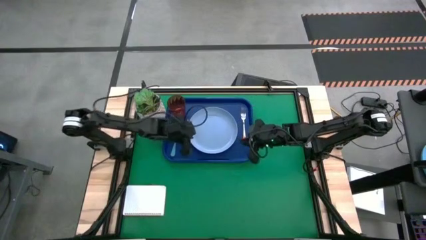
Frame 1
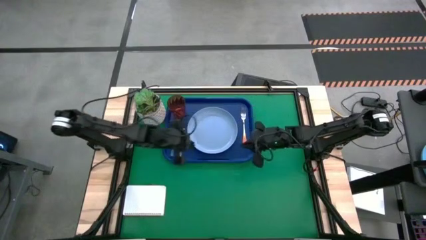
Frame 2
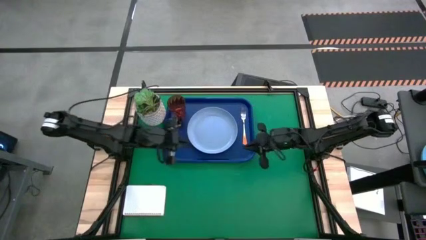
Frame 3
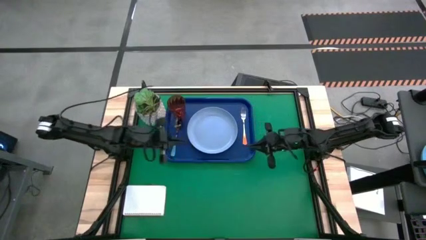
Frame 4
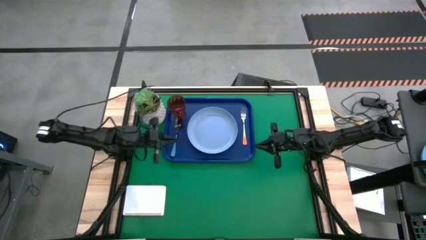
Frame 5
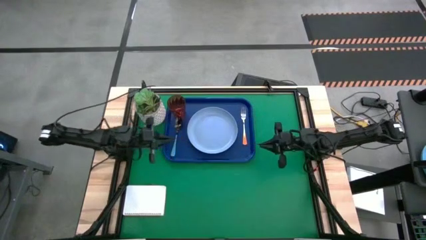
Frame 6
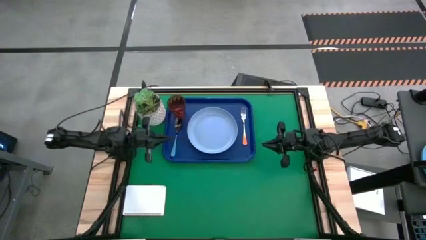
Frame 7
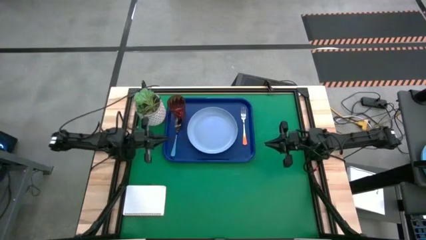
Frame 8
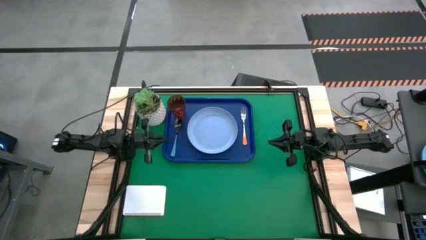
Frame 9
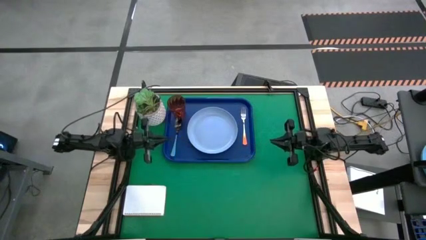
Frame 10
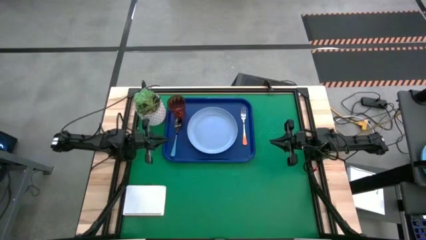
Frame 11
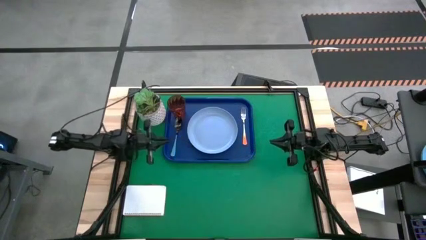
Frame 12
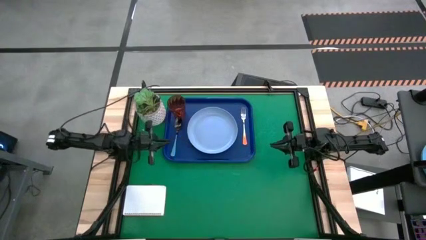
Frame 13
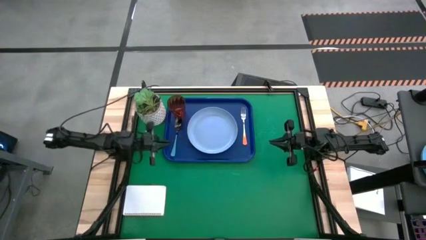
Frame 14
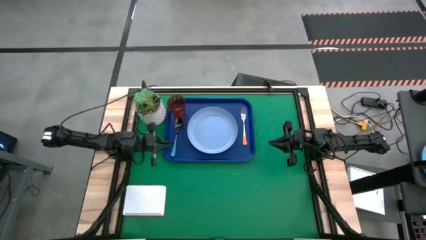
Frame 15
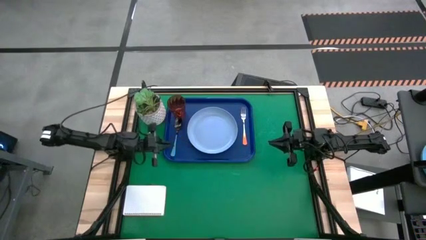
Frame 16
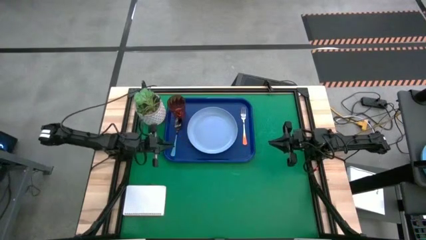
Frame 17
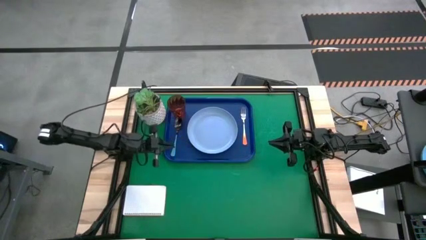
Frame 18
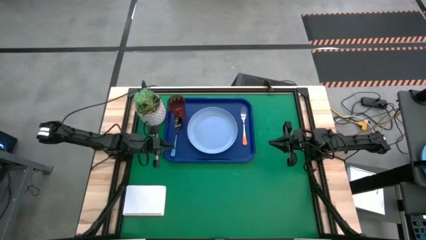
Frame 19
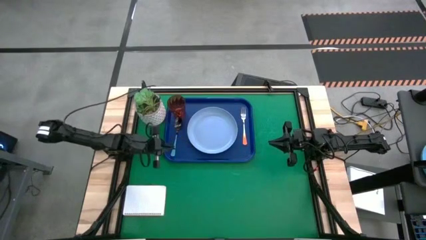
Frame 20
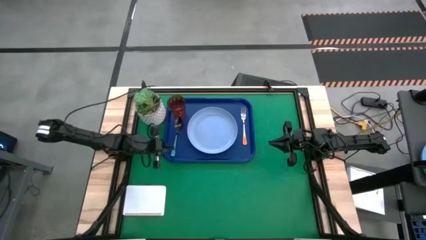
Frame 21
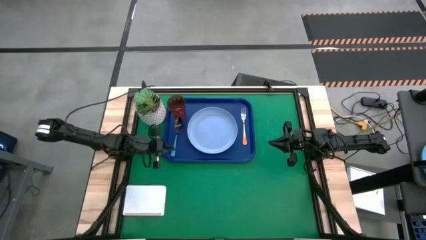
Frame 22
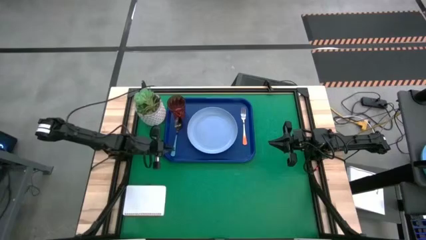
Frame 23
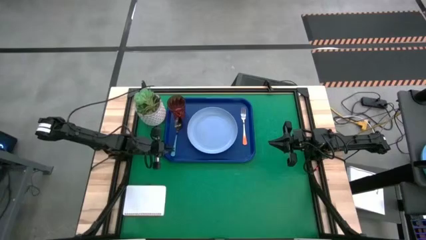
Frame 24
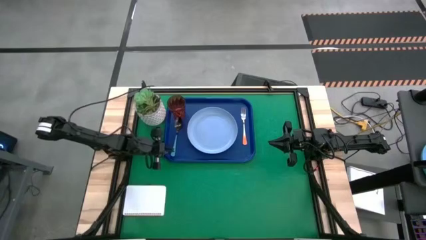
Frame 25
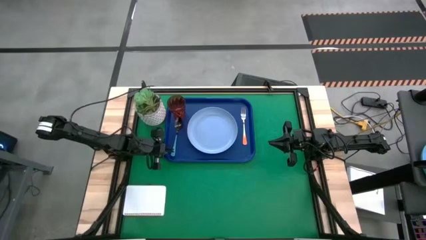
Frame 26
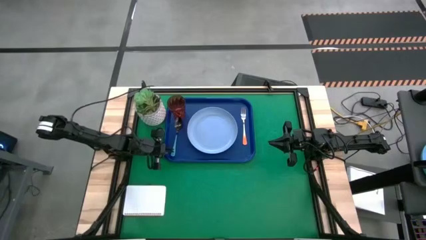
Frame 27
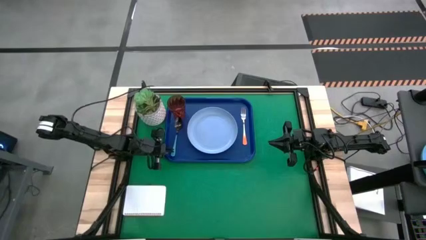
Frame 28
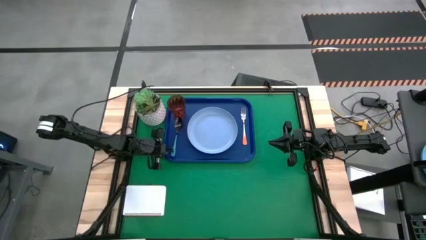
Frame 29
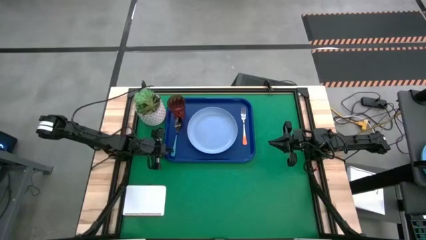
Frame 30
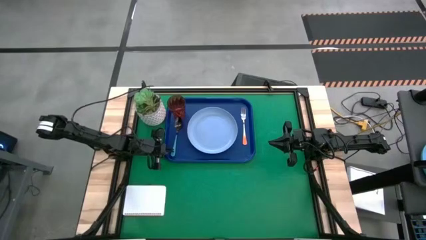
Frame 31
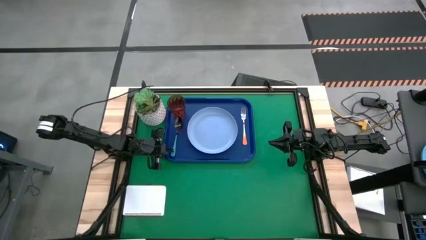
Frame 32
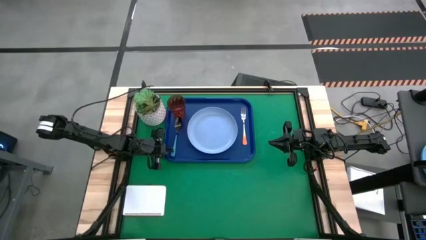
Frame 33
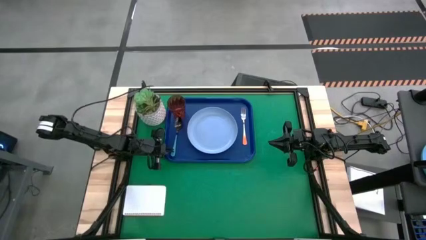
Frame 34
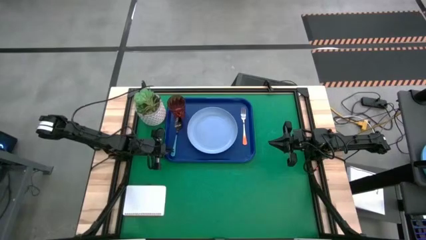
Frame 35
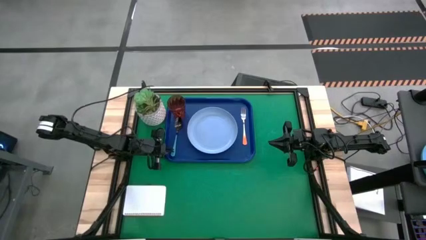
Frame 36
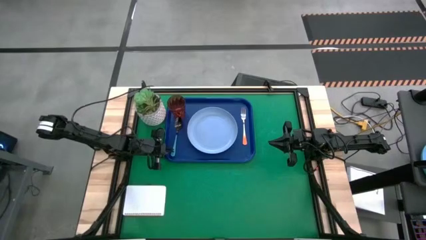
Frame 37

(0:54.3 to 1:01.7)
Task: Pick and place plate/cup/fork/spoon on tray
Return to Home Position

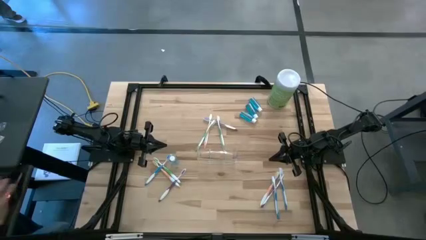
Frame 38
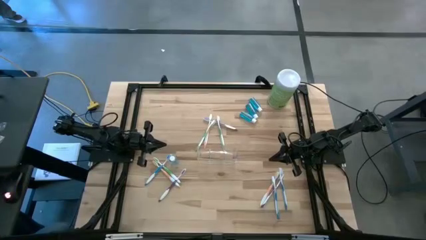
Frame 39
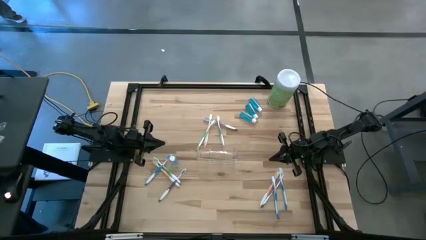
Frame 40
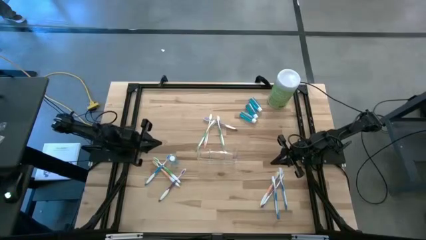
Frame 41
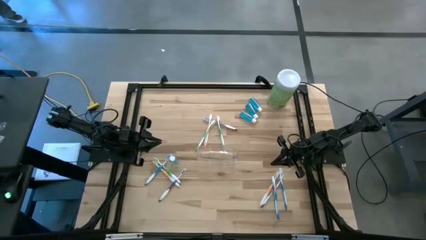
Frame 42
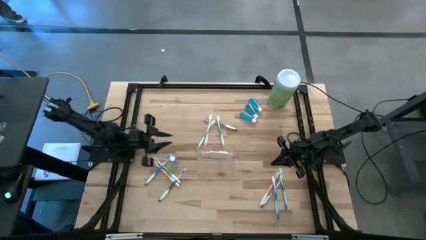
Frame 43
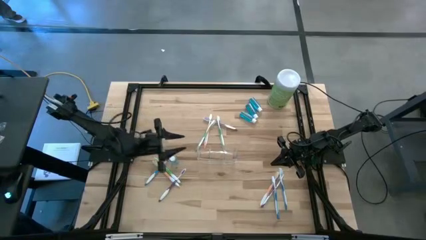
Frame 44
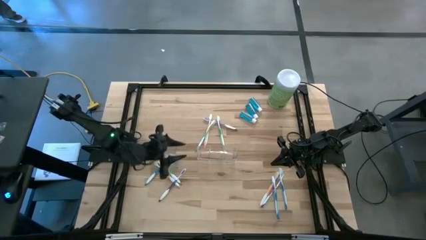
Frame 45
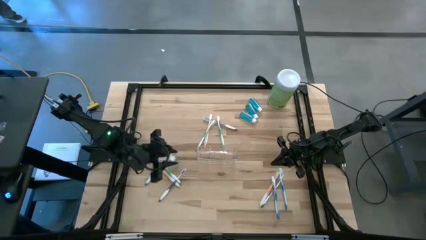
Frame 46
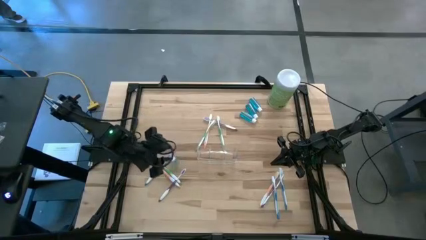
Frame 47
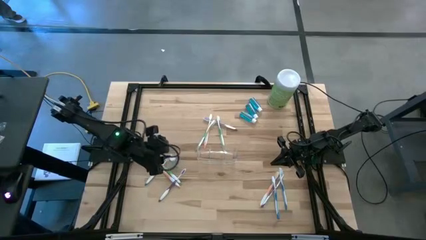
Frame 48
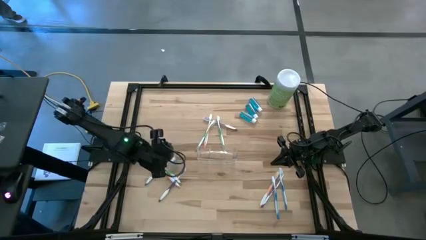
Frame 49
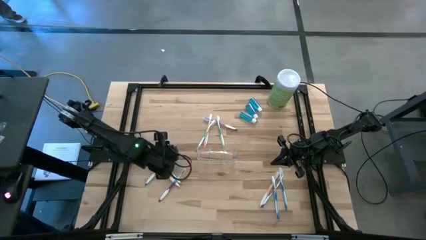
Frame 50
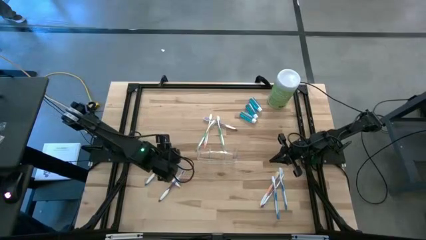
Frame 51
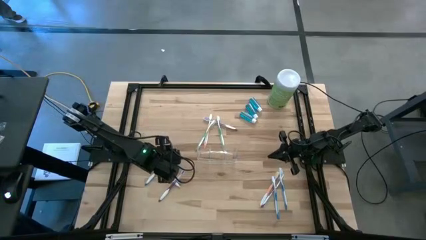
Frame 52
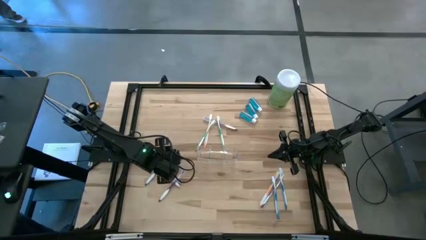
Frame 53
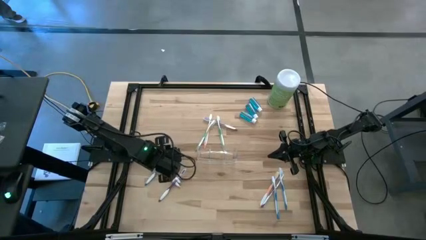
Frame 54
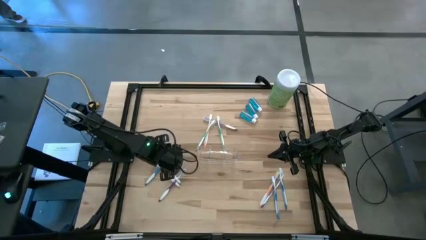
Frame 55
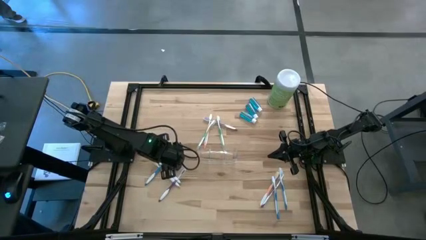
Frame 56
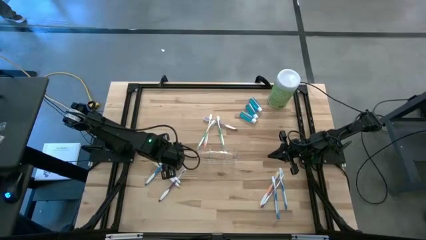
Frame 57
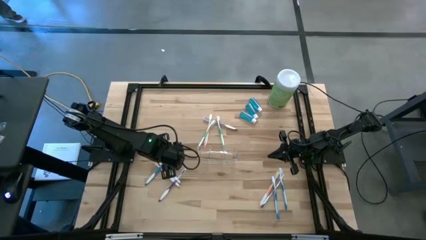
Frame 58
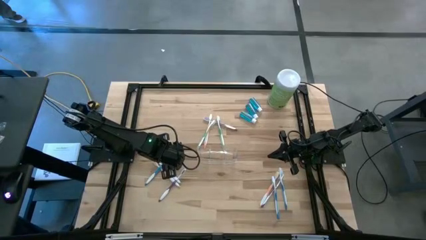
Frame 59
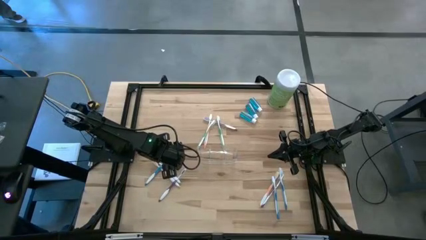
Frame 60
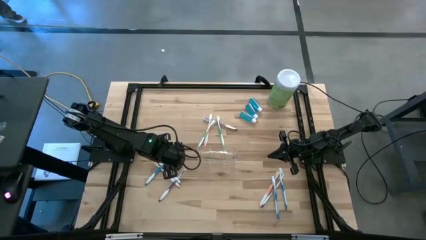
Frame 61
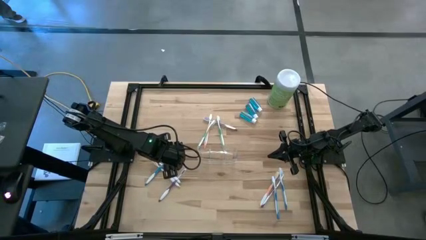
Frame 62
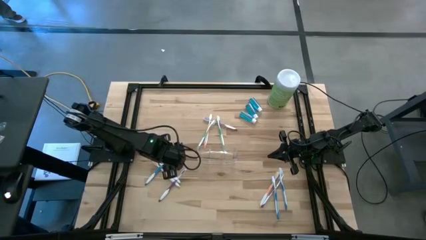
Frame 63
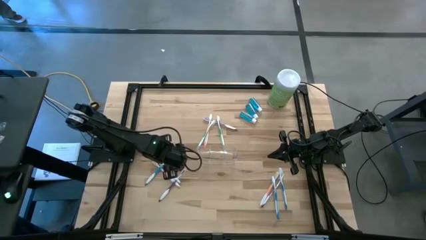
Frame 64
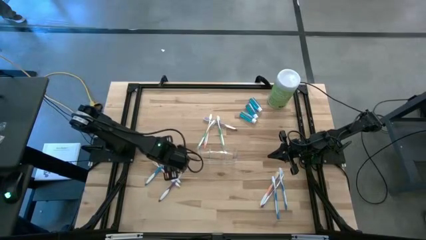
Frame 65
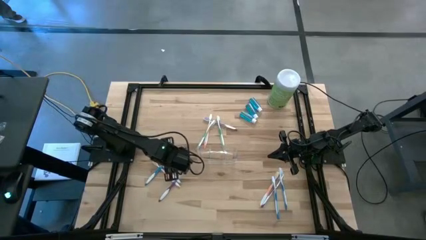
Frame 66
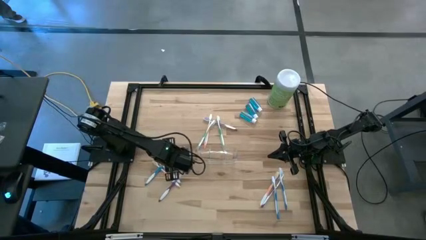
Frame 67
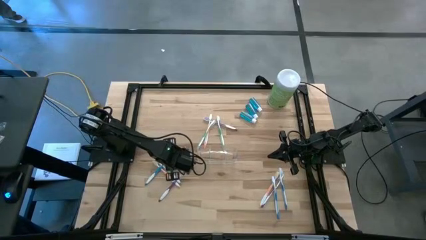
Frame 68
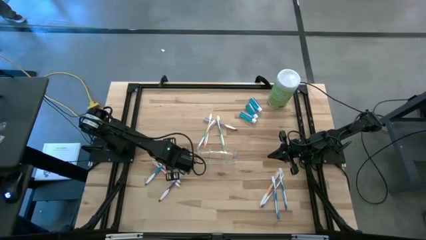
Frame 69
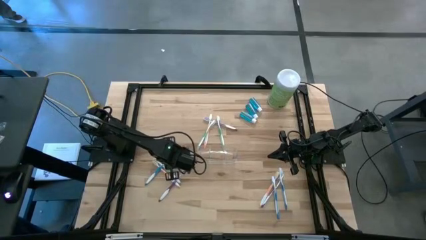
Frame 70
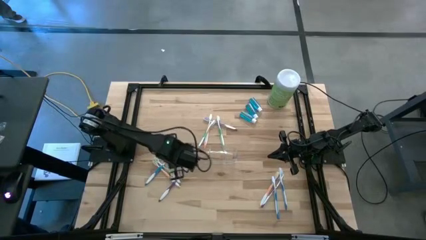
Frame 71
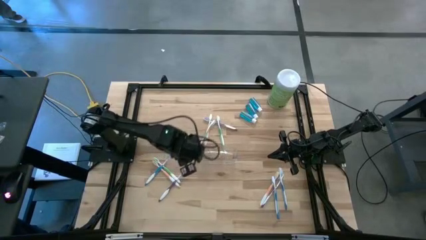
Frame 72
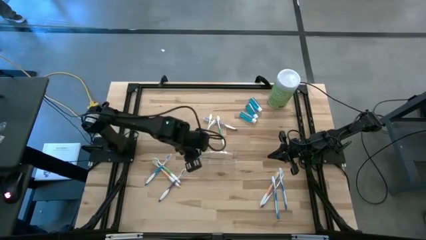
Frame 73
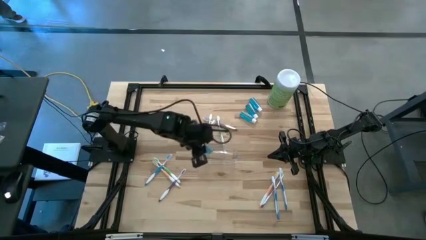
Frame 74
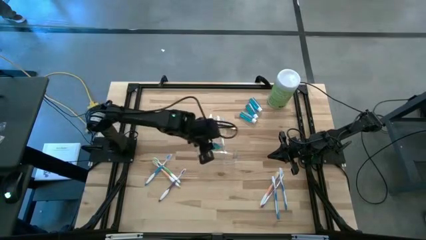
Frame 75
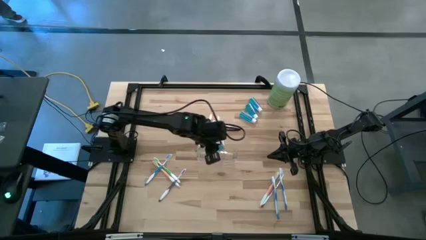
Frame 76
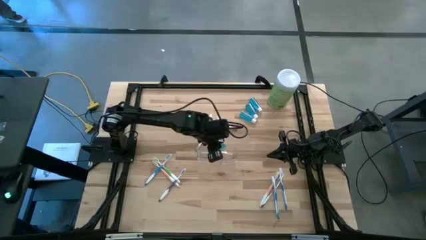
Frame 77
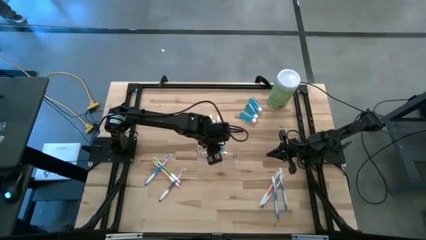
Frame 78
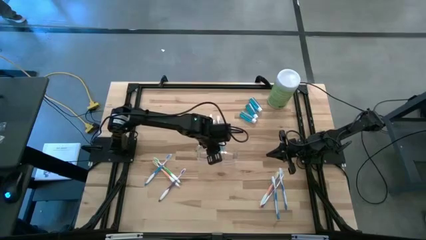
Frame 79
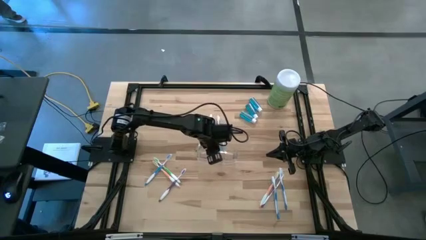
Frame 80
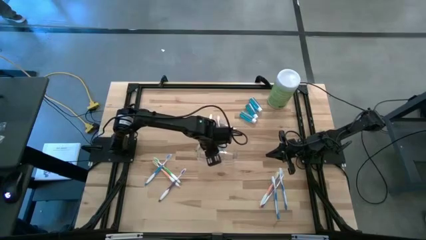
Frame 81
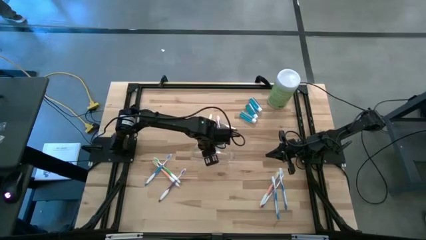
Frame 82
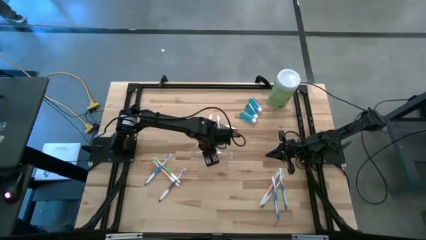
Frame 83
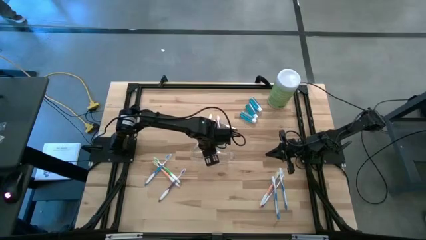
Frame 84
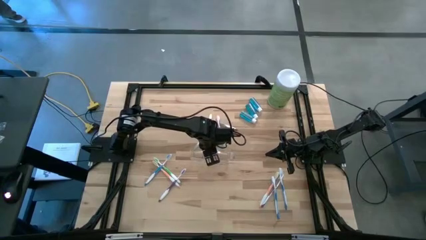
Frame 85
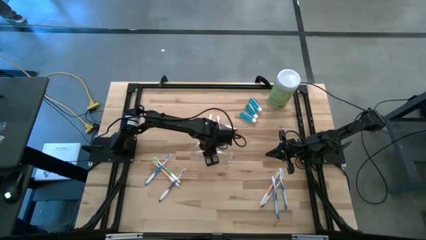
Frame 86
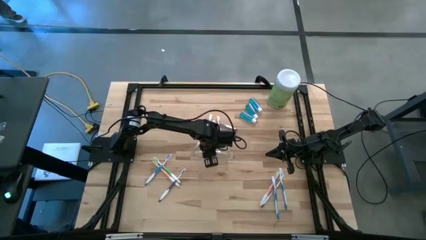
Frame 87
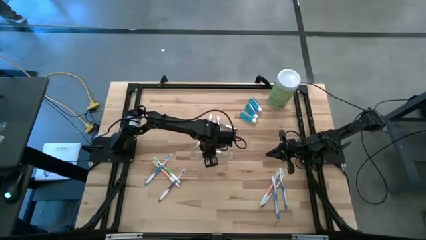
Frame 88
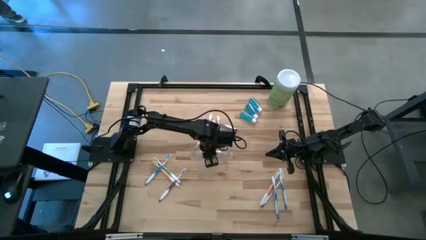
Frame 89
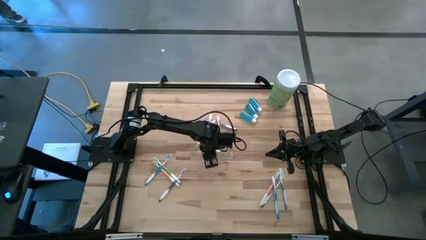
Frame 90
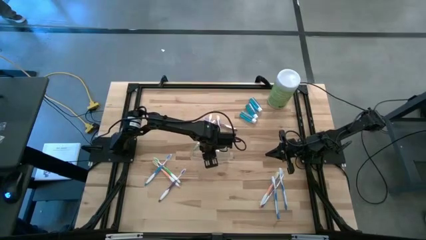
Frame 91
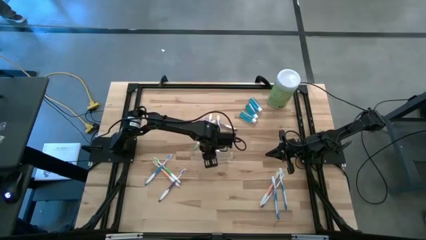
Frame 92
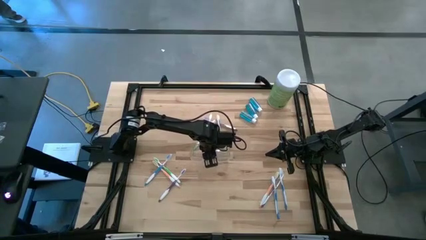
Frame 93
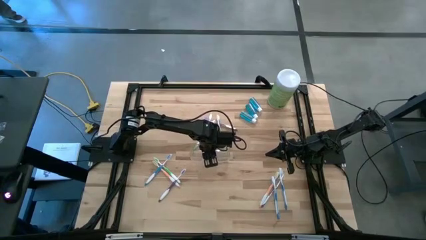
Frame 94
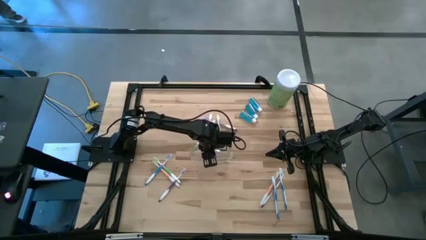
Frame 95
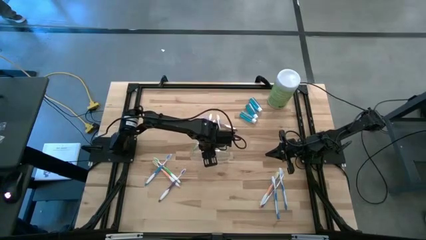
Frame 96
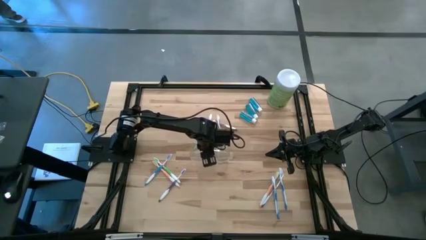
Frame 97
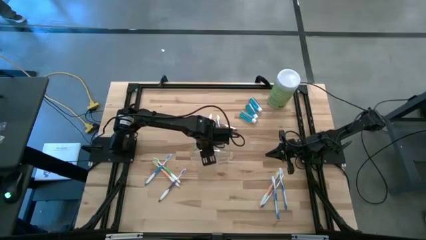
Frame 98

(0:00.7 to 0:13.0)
Task: Pick & Place toothbrushing station
Put the mouthwash into the center of the transparent organizer
